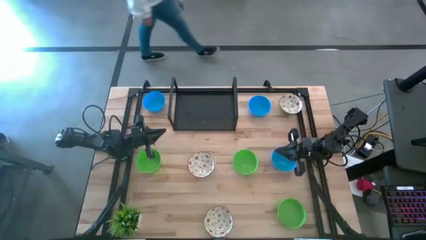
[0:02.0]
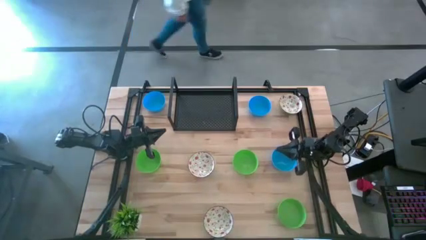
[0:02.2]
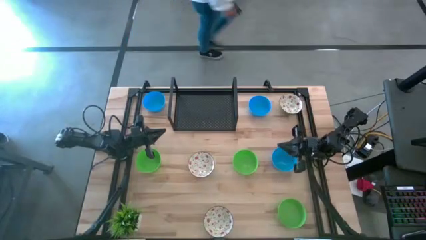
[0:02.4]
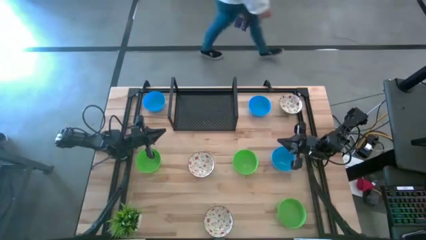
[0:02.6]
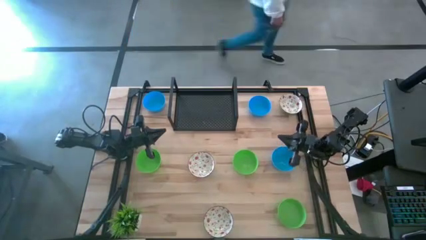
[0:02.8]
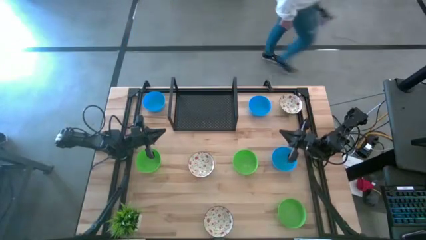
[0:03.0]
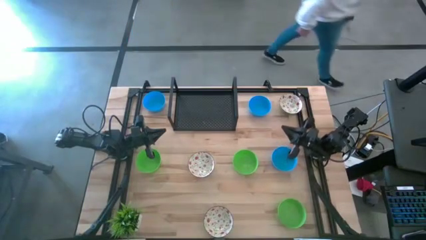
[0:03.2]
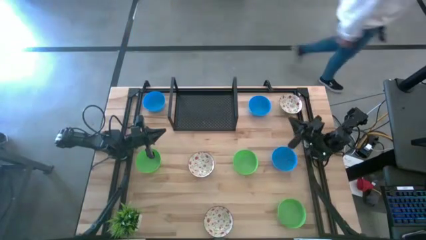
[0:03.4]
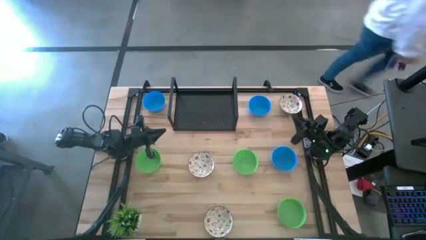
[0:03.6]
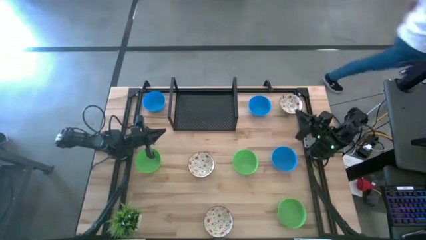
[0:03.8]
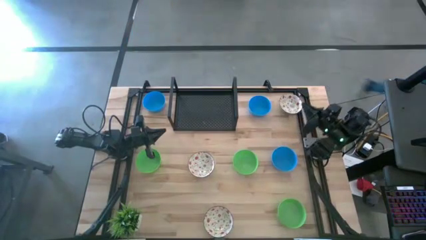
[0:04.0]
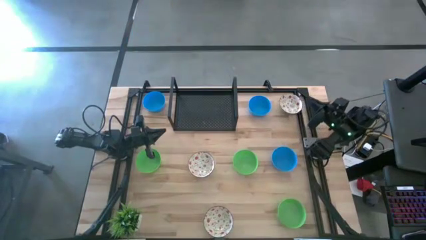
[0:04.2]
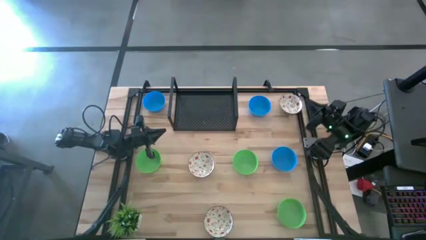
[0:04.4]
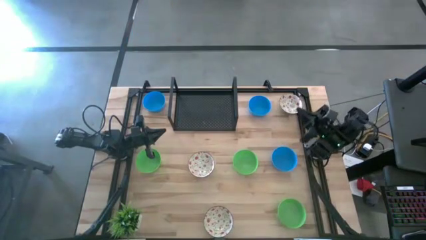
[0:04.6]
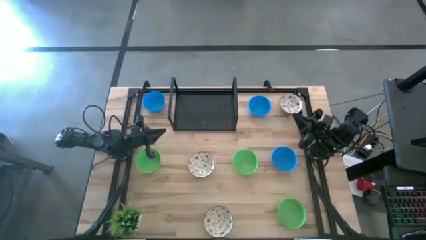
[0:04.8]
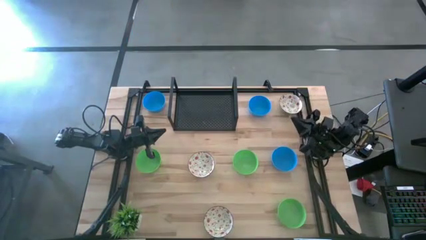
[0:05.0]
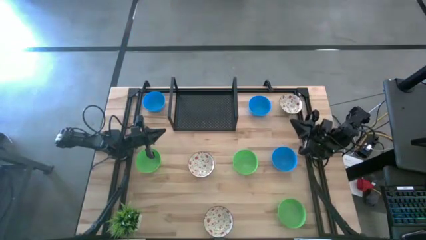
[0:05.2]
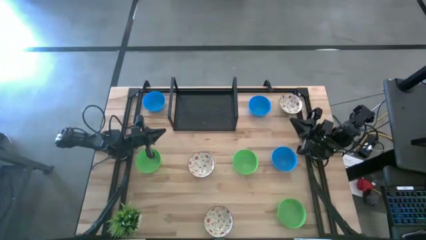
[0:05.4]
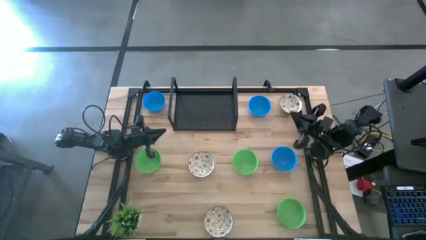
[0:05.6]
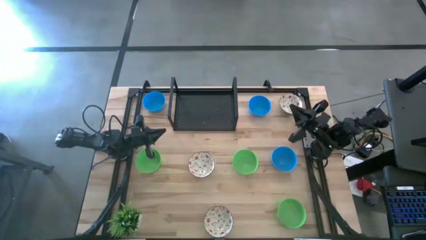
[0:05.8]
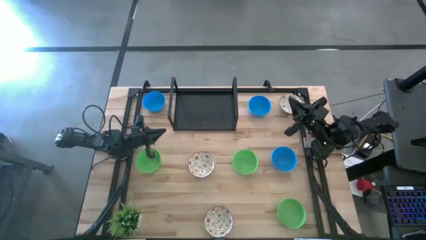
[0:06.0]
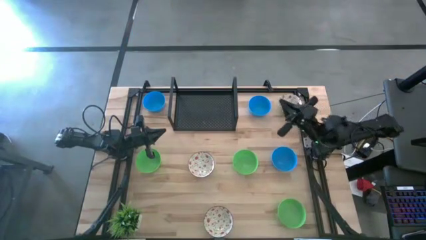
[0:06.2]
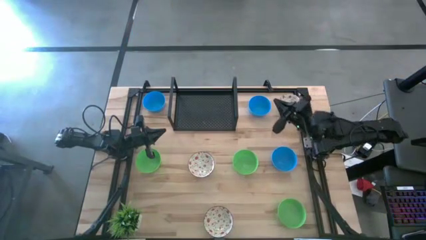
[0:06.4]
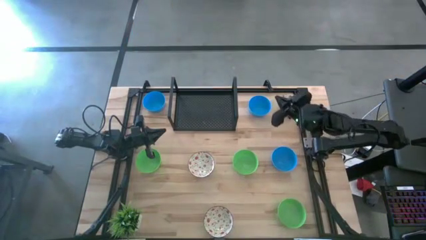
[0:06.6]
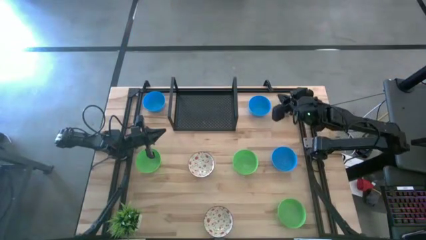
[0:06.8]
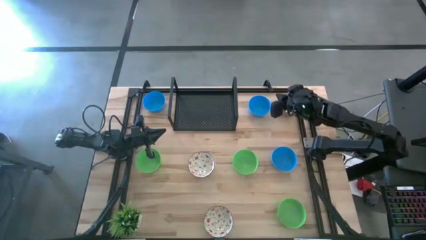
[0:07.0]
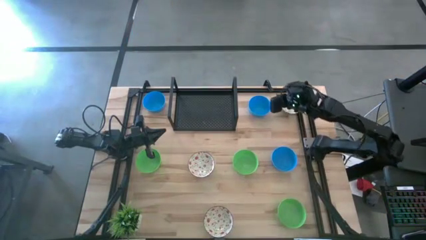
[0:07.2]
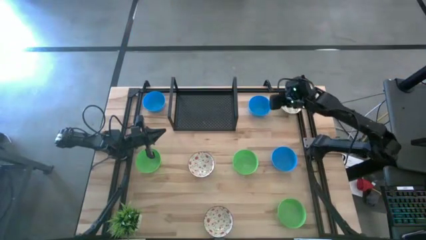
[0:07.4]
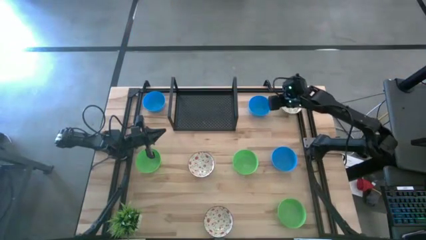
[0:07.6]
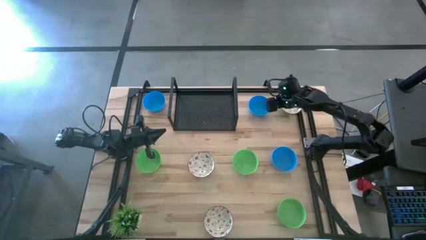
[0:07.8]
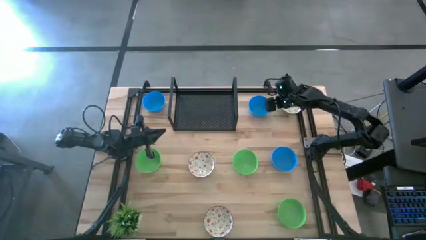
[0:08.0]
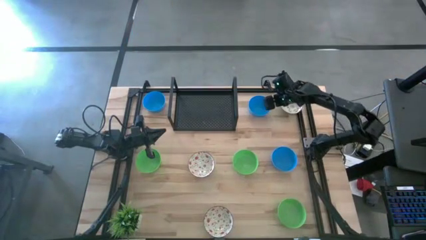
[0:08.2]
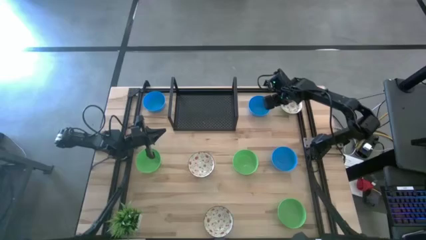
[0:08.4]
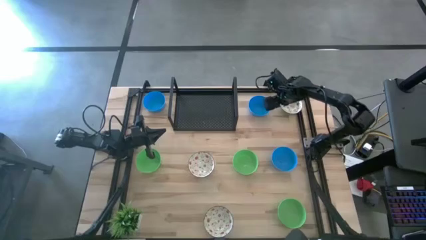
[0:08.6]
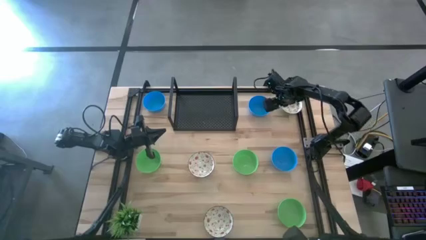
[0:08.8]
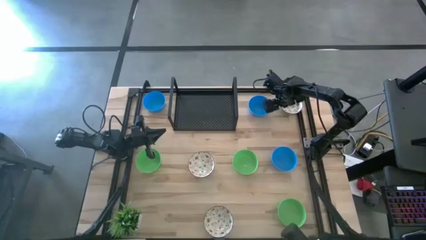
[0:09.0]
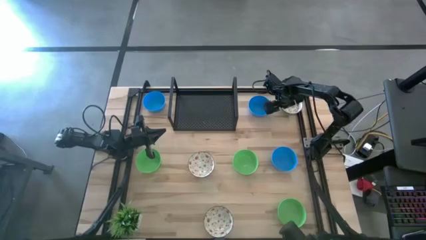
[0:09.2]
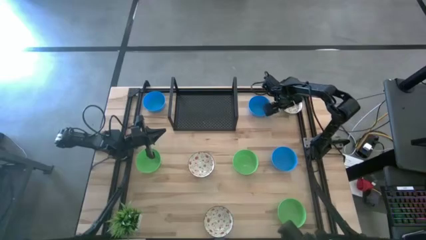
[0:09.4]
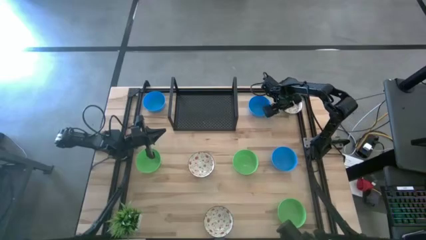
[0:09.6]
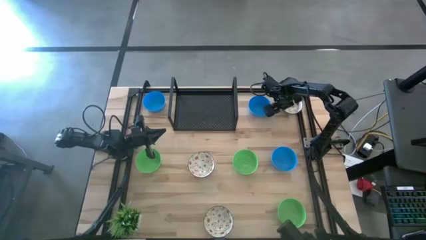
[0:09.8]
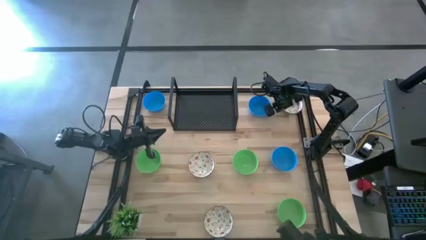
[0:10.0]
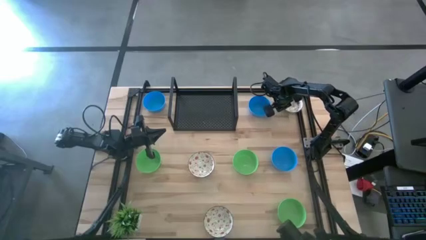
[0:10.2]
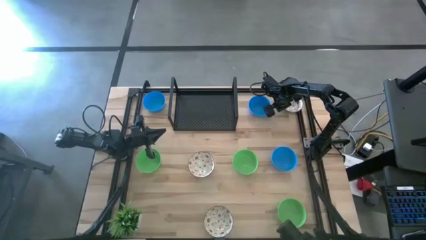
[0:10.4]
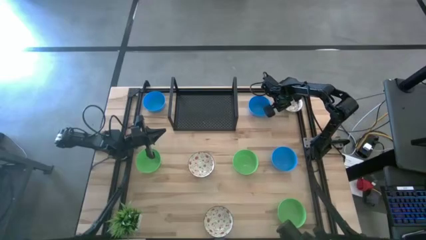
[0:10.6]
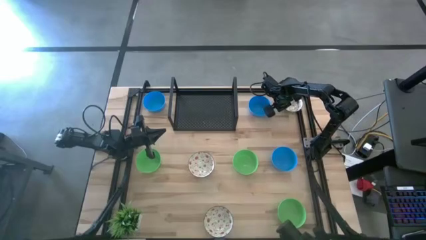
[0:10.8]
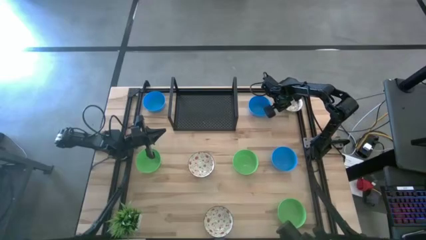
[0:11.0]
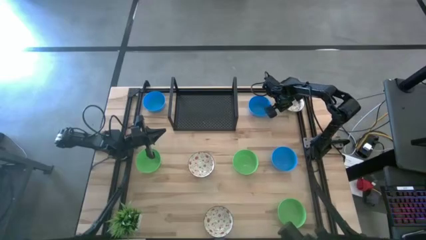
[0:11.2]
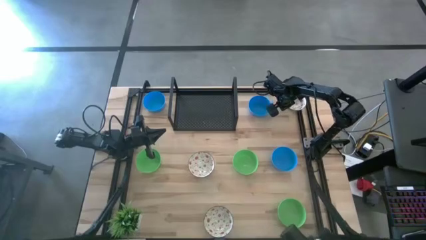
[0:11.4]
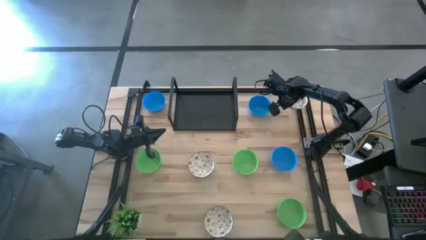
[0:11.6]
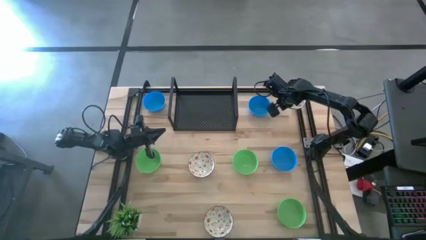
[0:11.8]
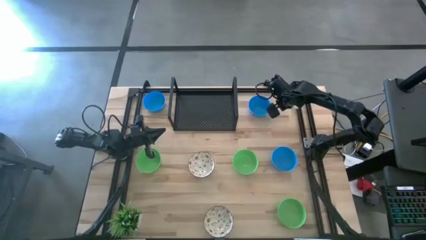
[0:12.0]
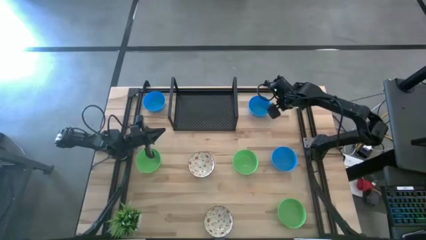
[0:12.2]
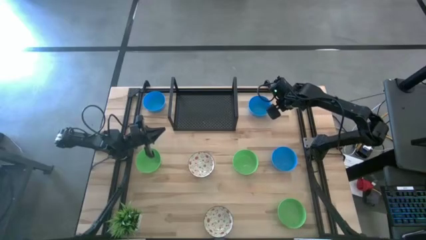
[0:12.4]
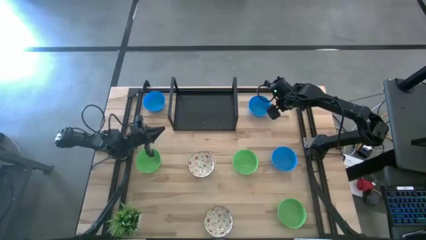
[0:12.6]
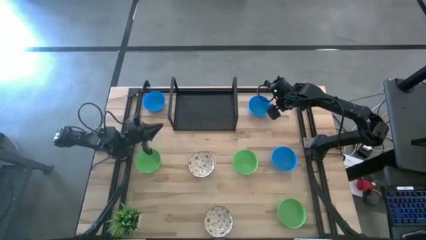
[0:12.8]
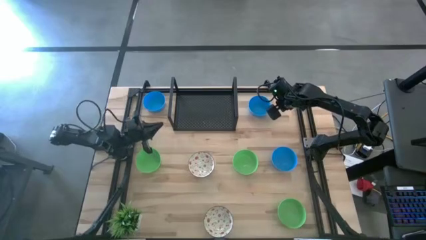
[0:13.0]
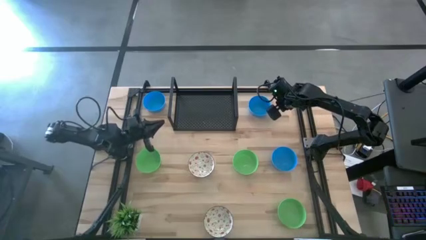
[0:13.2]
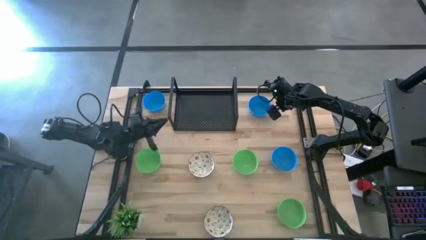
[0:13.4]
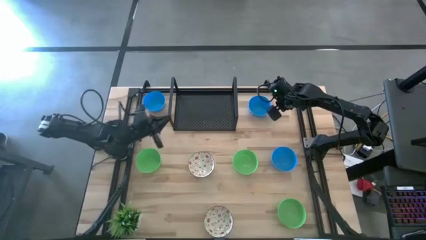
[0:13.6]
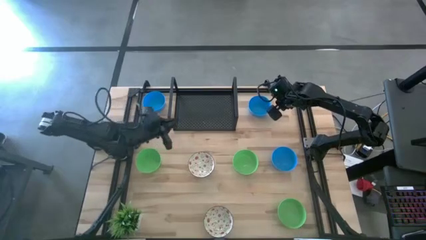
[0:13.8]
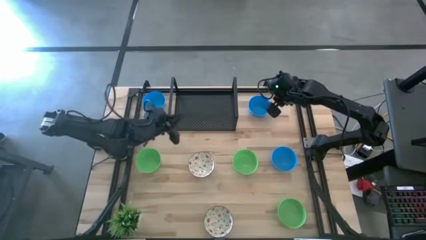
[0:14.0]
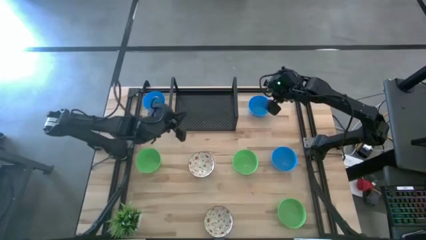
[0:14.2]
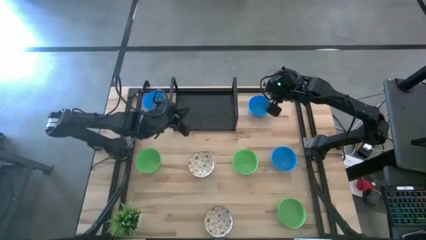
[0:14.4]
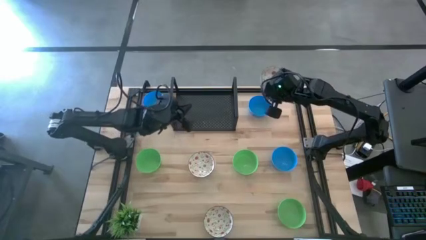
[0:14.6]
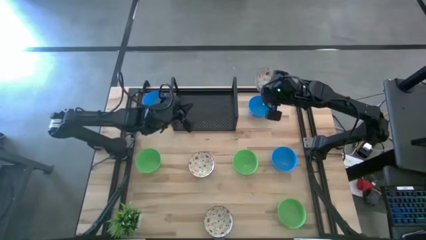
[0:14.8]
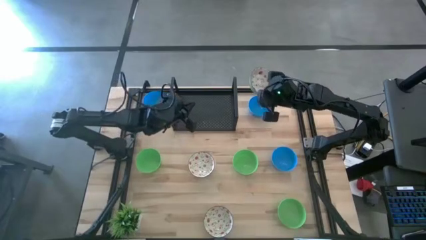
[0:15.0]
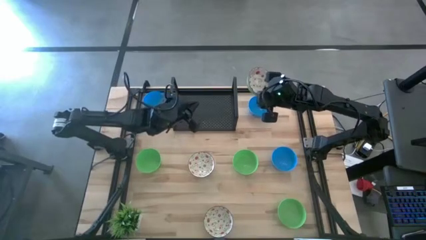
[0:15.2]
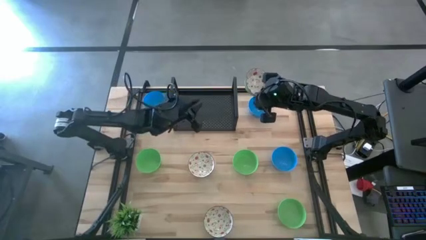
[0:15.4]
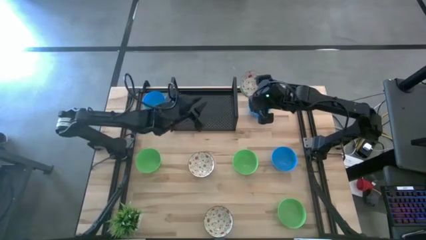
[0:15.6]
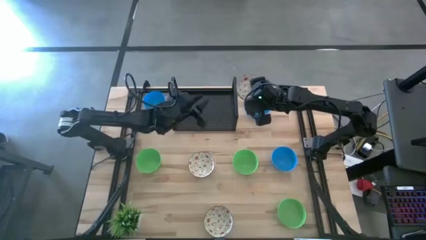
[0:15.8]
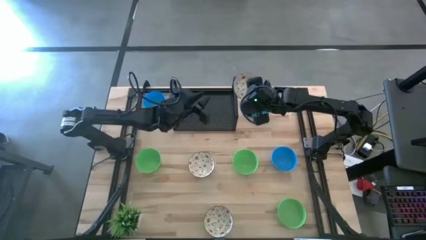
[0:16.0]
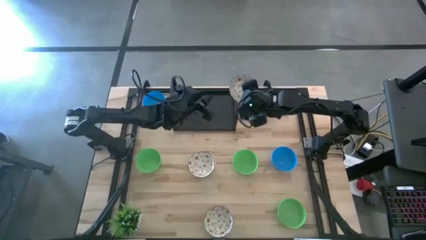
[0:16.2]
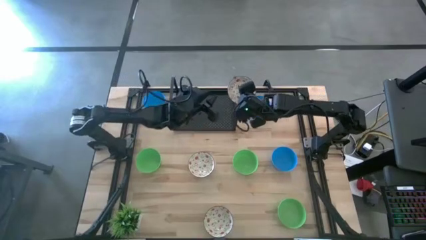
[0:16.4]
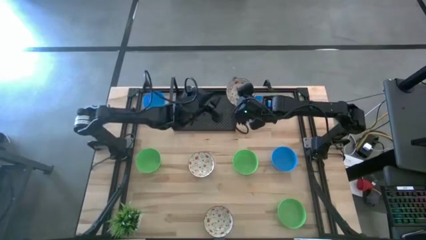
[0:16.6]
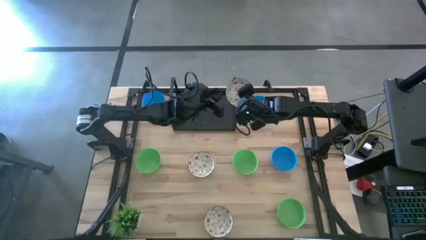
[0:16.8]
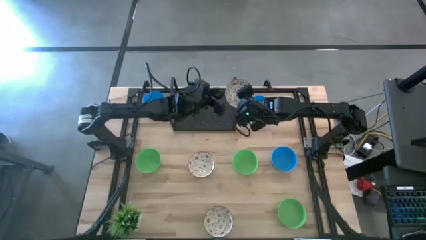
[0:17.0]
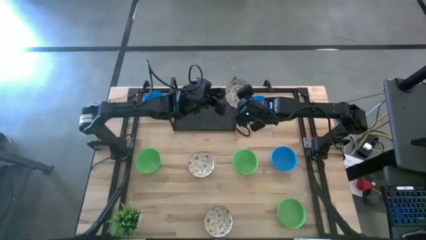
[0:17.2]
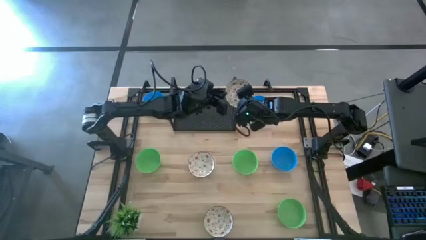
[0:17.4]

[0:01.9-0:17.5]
Task: Pick & Place Mini bowls
Put the top white bowl on the shelf
